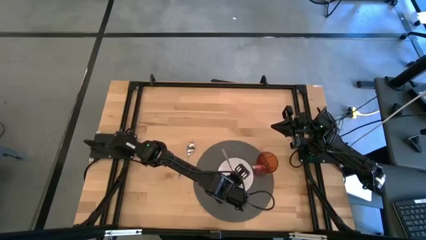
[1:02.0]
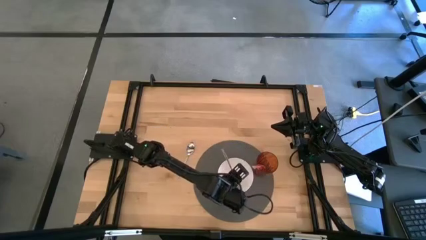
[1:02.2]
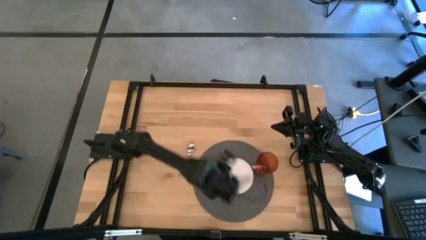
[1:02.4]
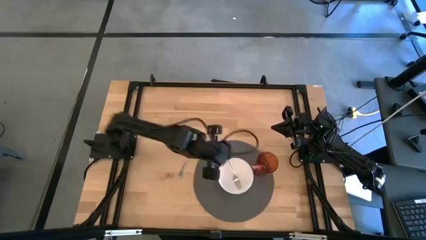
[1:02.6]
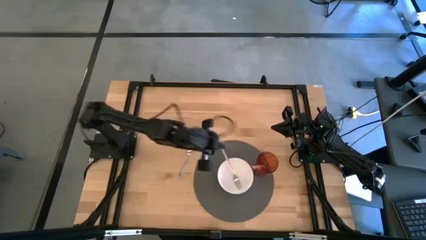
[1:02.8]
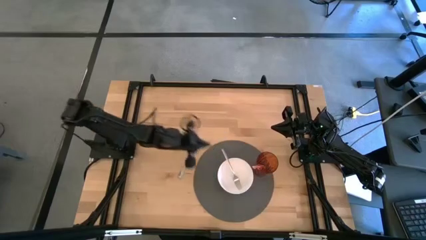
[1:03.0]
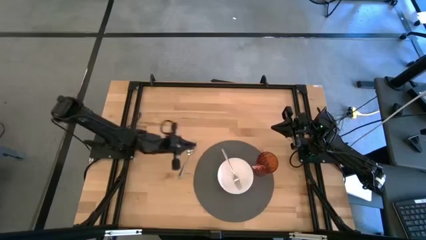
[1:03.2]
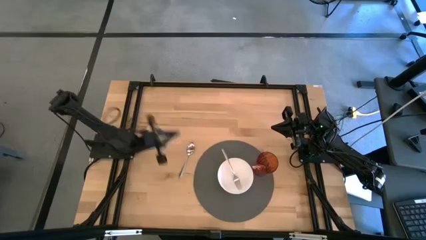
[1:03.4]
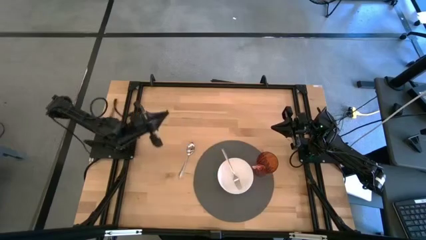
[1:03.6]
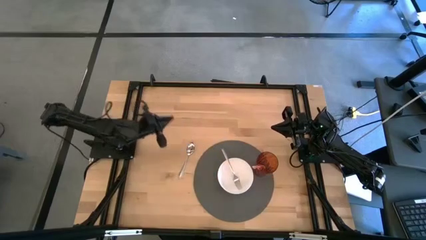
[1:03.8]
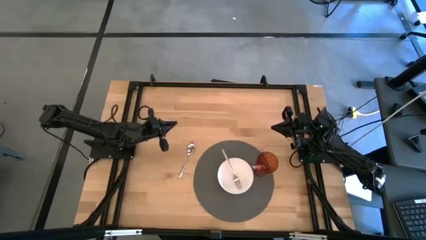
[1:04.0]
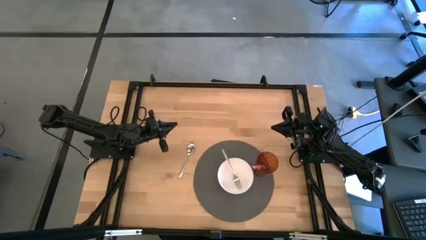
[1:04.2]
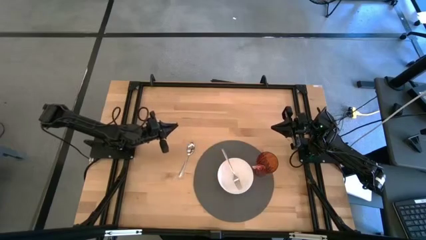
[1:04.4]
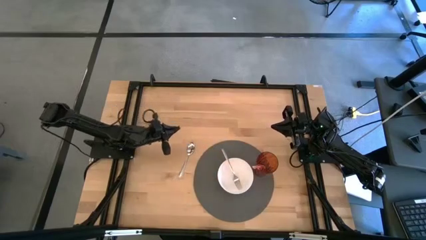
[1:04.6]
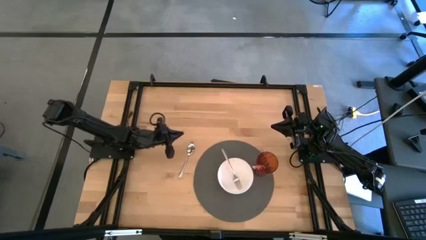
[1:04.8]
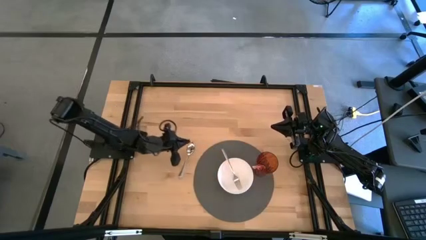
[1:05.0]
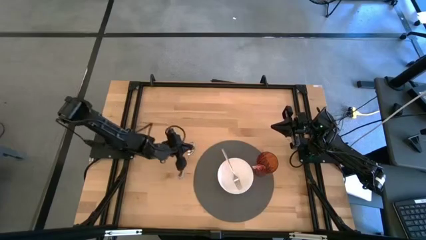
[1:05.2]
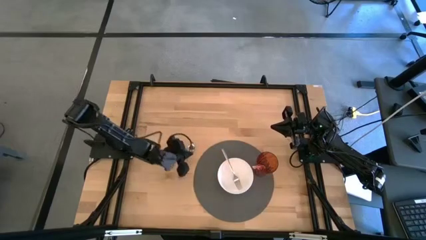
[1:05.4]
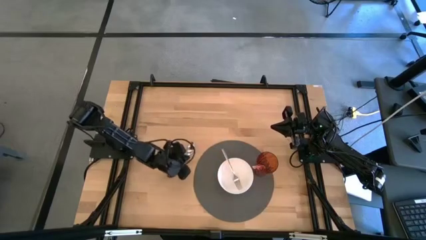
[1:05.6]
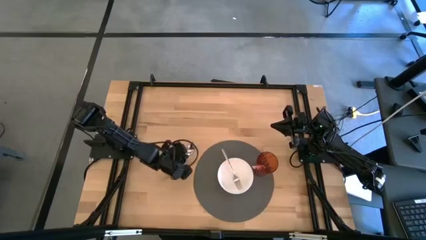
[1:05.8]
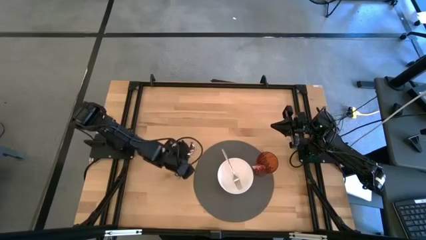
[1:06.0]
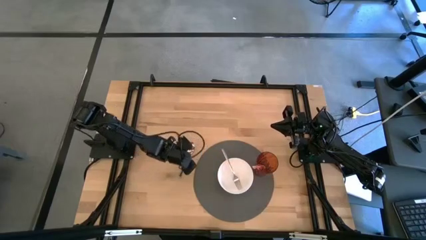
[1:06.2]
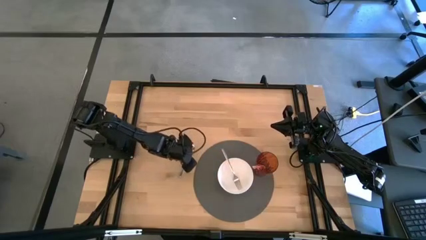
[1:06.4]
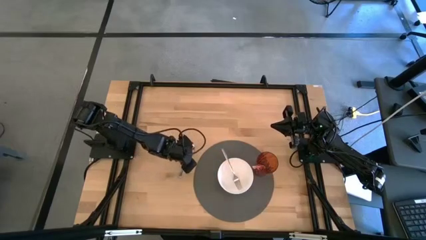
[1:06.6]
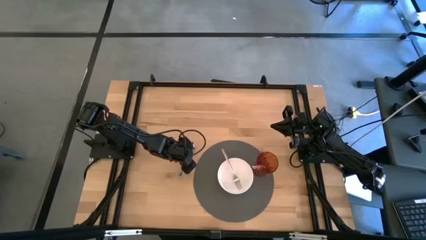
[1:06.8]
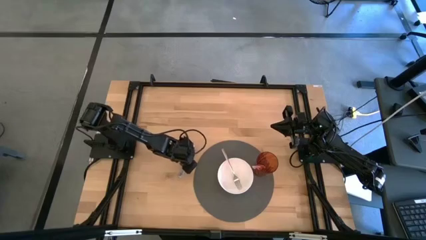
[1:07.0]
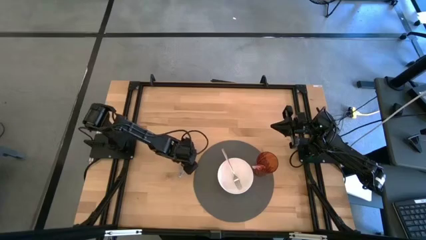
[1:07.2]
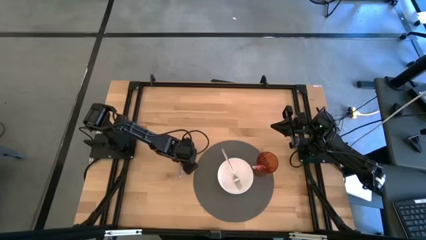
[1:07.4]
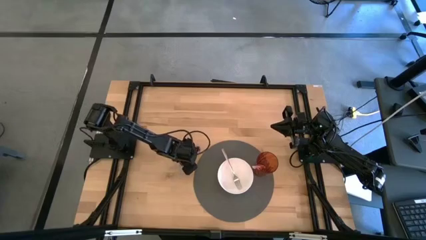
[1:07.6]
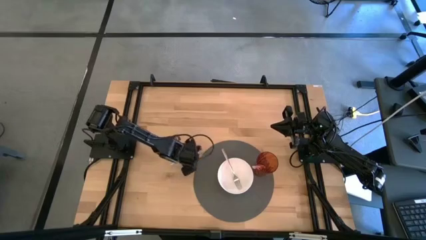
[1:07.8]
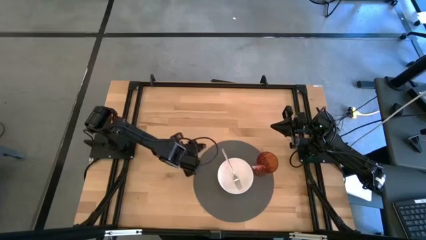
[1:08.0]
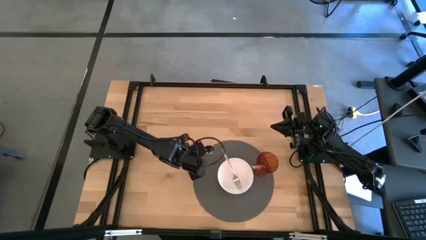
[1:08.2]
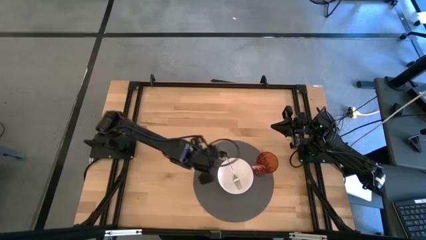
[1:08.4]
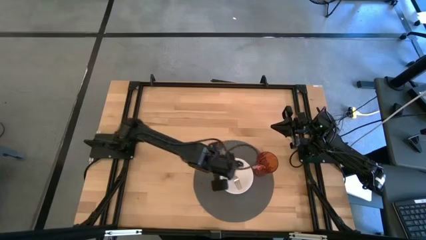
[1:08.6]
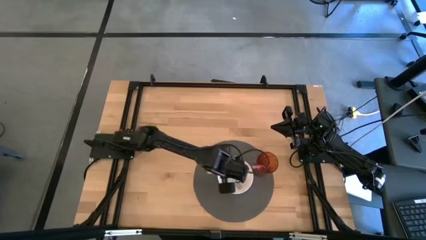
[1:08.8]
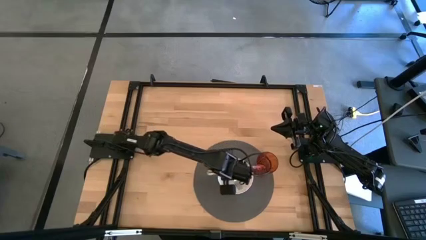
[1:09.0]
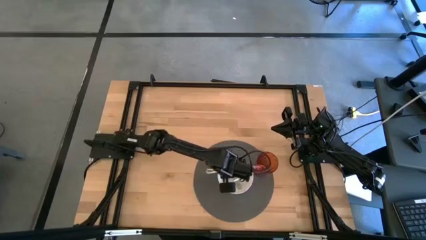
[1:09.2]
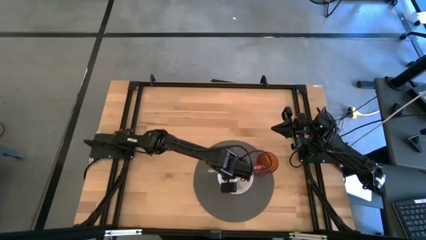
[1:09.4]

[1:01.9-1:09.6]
Task: Pick & Place Utensil
Put the silver spoon into the white bowl

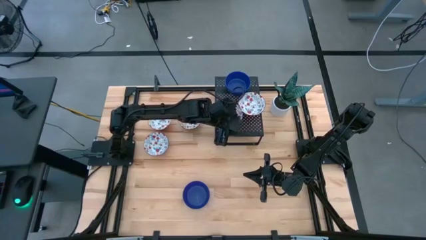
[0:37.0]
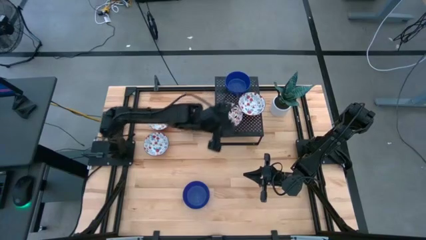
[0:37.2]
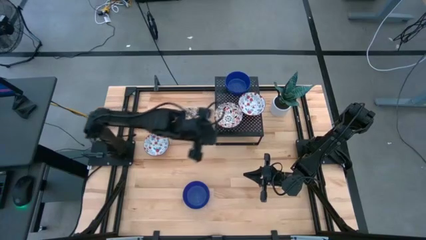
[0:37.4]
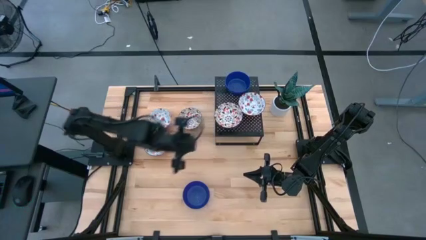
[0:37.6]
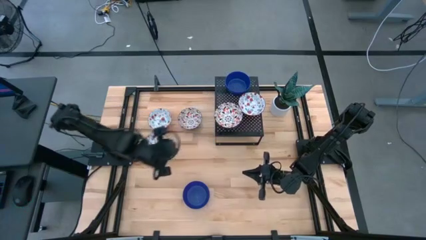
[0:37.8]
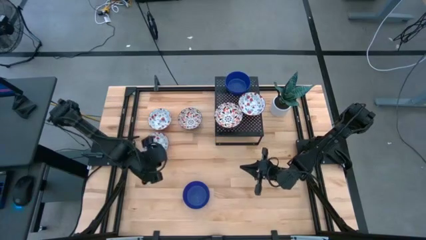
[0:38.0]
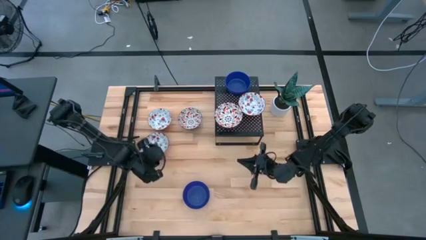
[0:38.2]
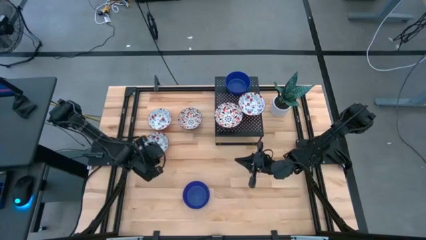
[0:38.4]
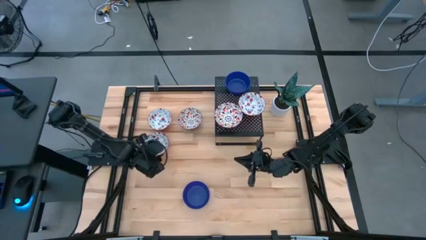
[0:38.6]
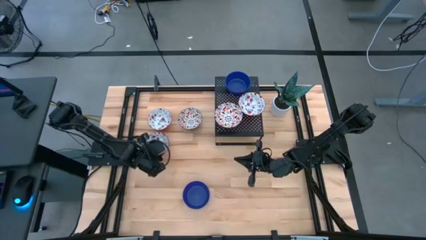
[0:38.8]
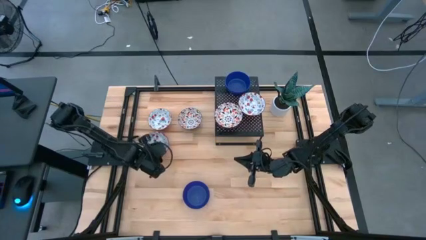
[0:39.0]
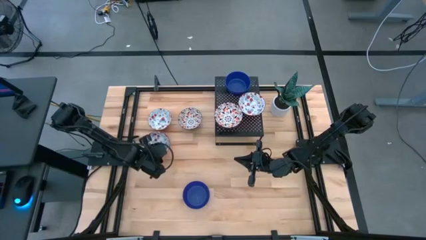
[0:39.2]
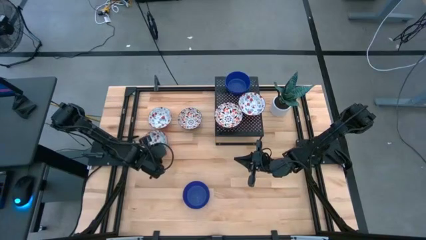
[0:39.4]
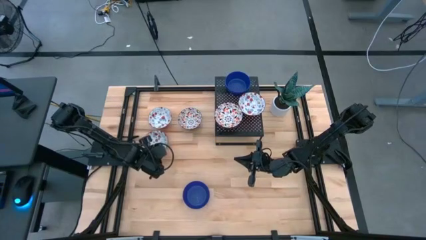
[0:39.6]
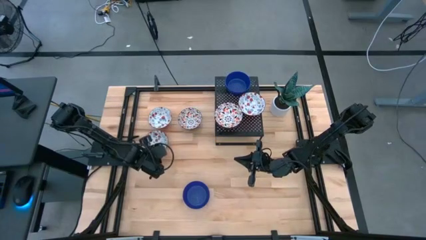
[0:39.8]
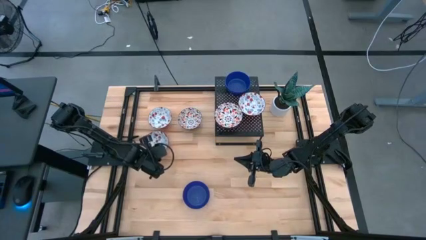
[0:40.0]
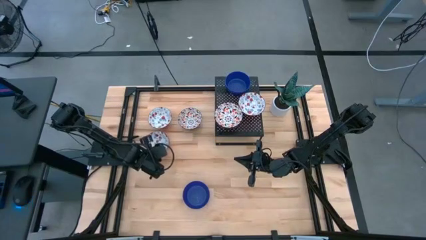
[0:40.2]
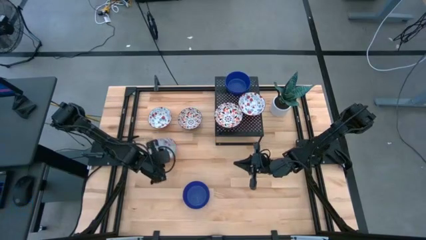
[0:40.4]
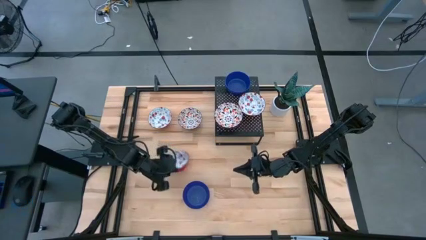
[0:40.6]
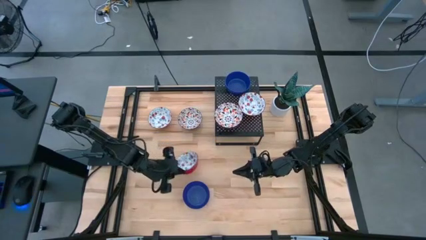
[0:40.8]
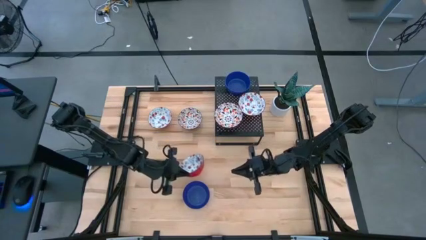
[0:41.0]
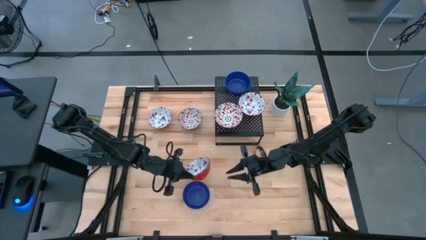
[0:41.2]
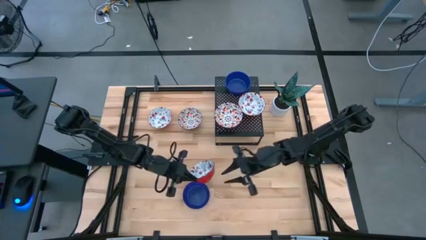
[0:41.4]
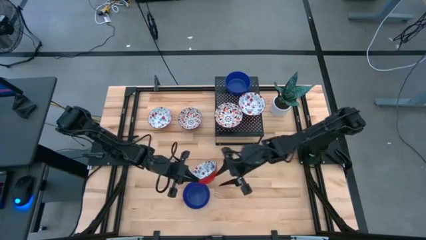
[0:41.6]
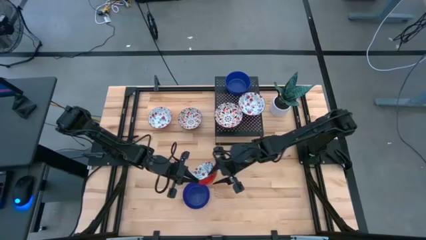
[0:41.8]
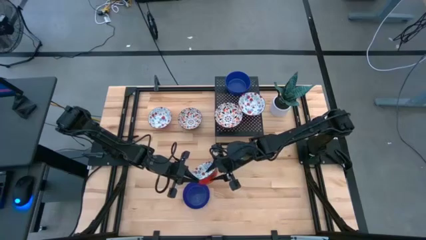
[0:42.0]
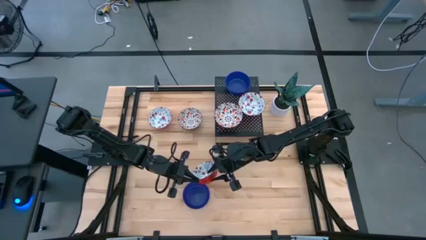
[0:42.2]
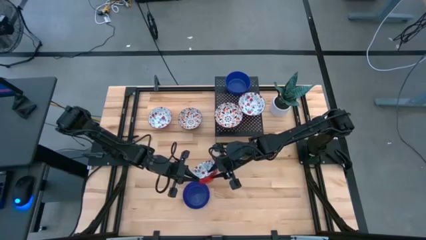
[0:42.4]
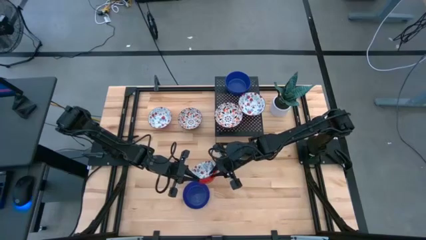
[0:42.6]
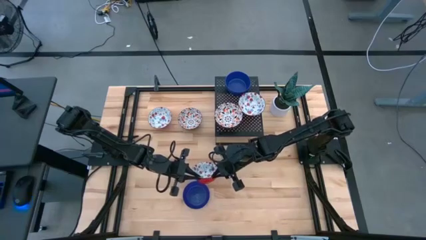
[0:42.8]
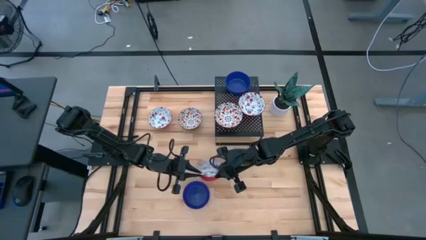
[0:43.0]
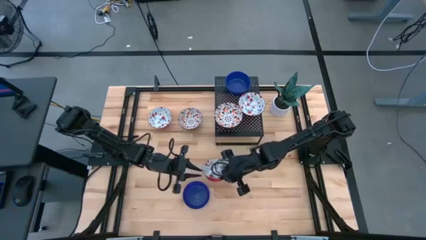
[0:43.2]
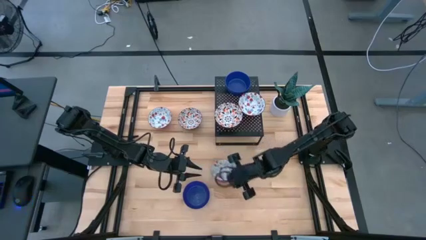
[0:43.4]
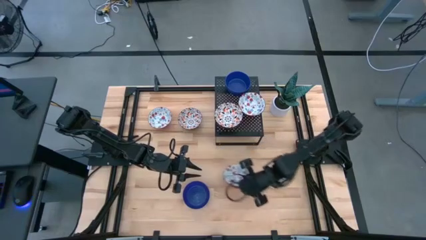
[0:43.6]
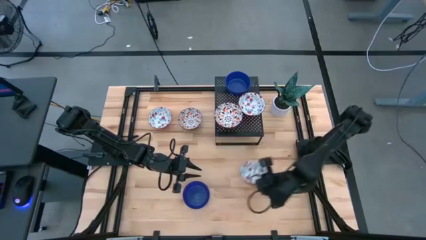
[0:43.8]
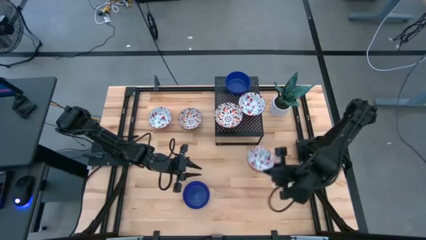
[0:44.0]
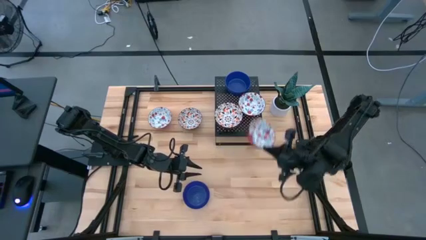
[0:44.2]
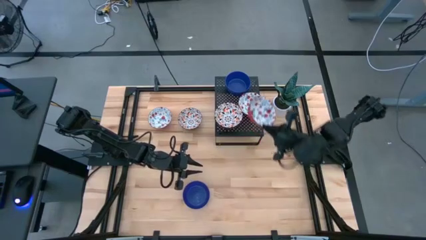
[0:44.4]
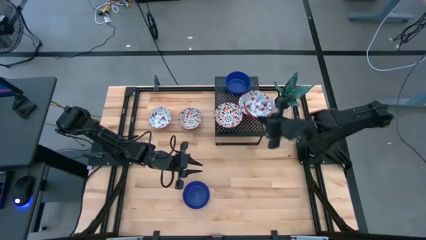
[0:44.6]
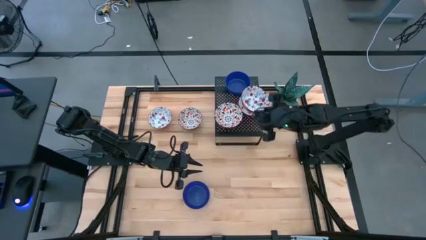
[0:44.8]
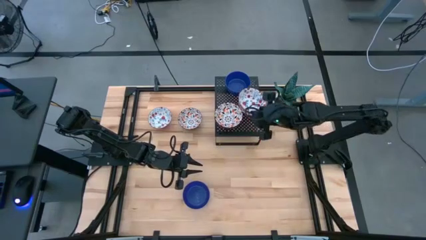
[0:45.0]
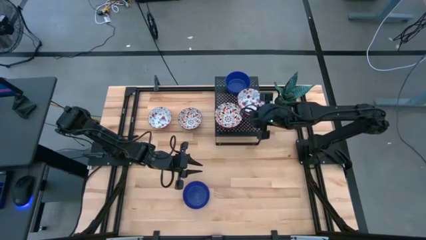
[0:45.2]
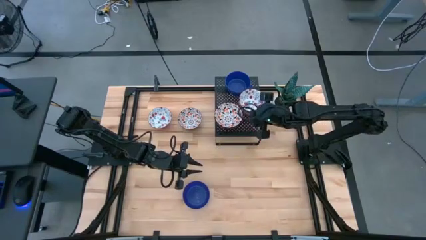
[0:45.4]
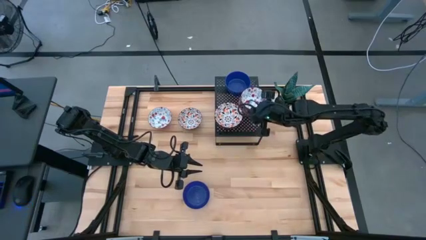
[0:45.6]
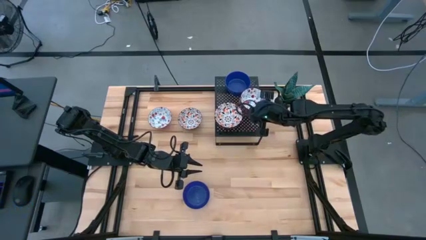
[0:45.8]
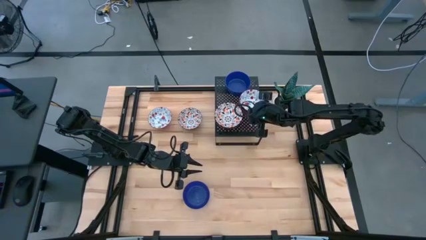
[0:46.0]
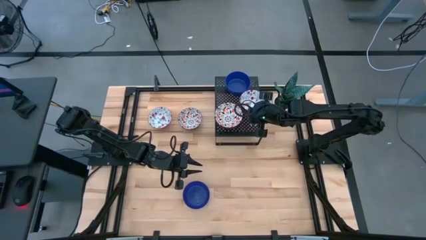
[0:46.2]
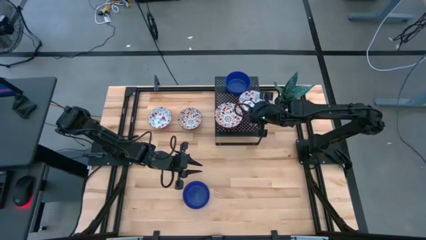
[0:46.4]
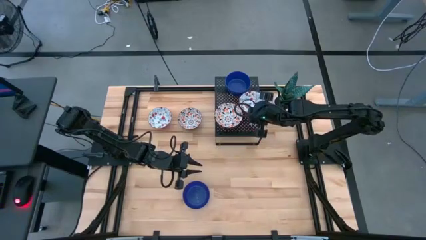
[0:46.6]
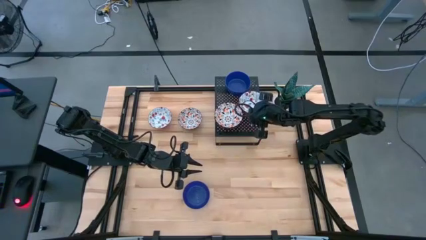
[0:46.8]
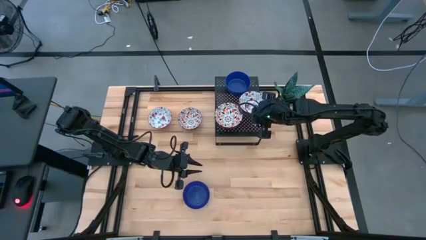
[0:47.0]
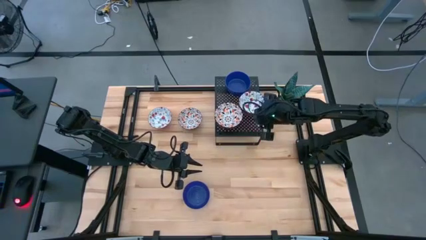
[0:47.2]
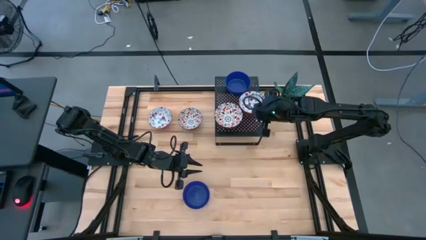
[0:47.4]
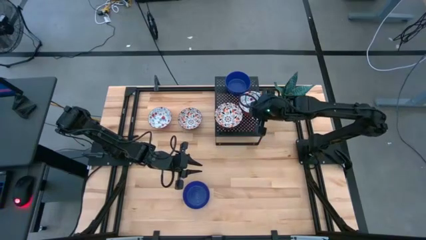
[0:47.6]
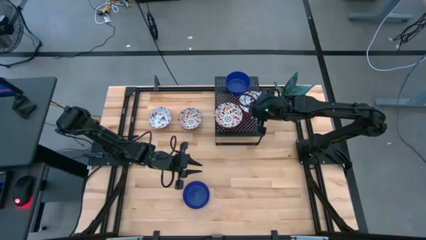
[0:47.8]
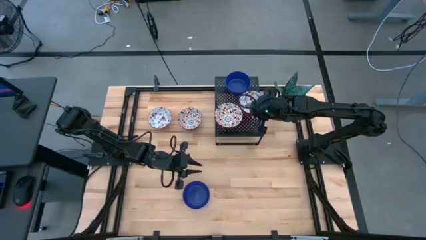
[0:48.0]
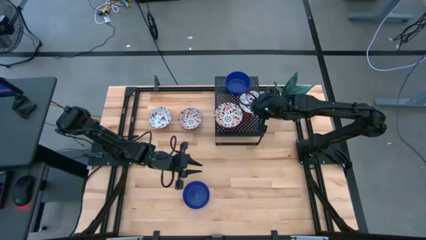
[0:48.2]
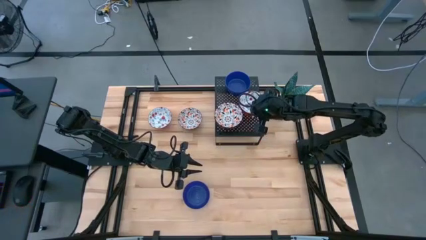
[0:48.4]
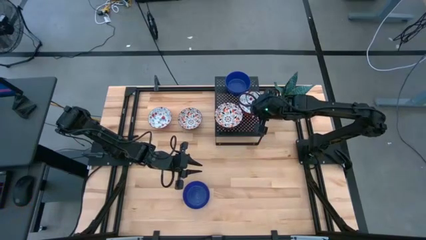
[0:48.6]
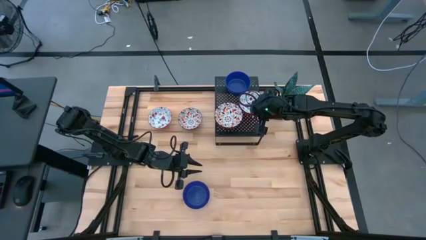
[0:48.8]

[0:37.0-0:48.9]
Task: Pick & Place Mini bowls
Stack the bottom red and white bowl on top of the red and white bowl on the shelf
